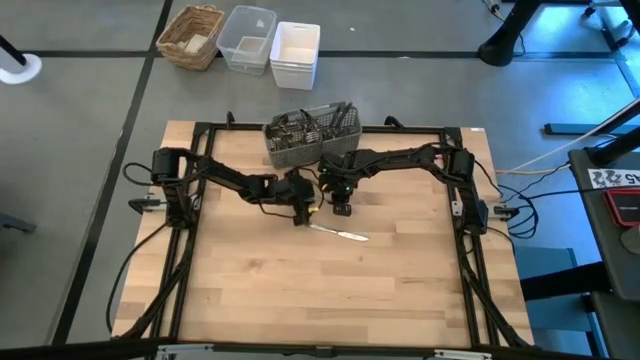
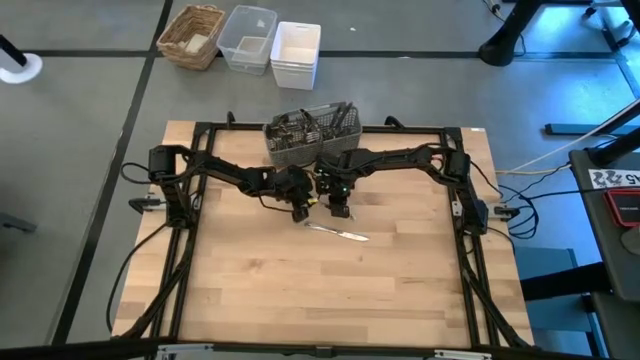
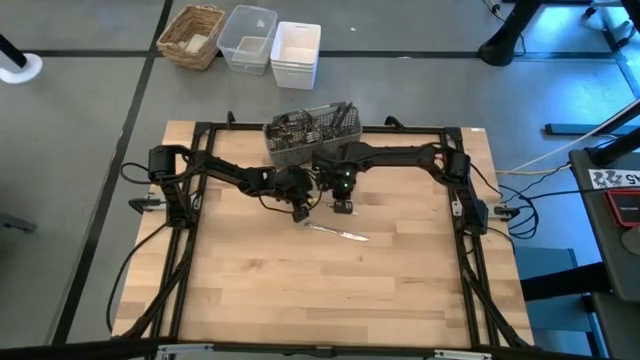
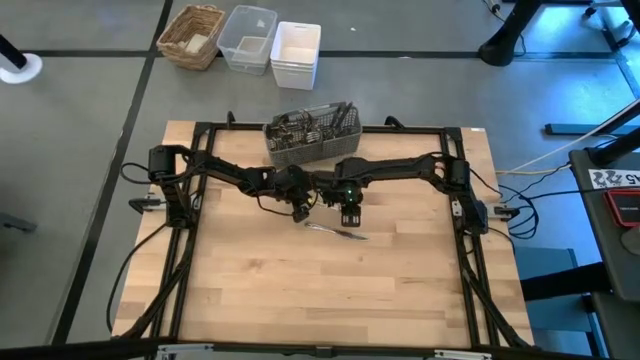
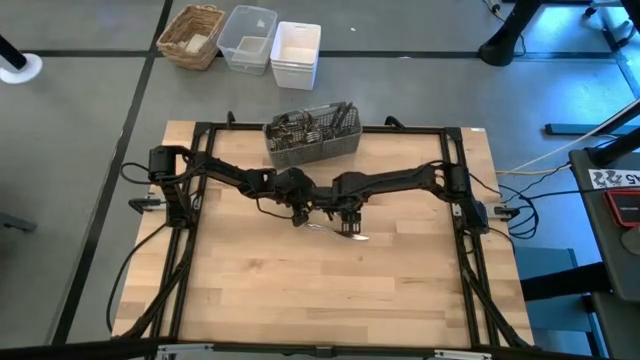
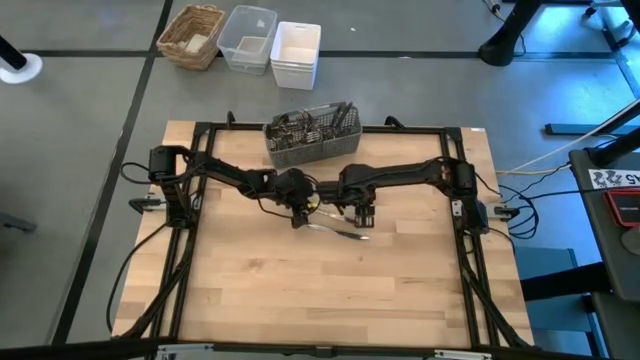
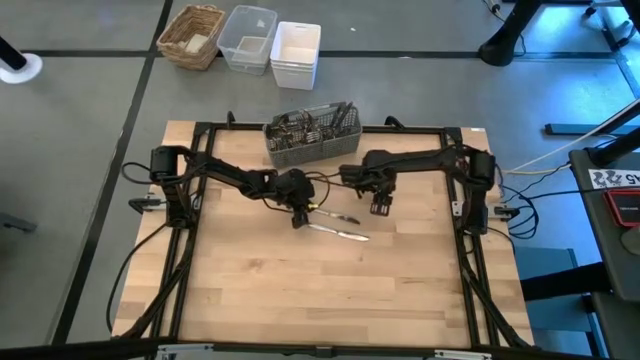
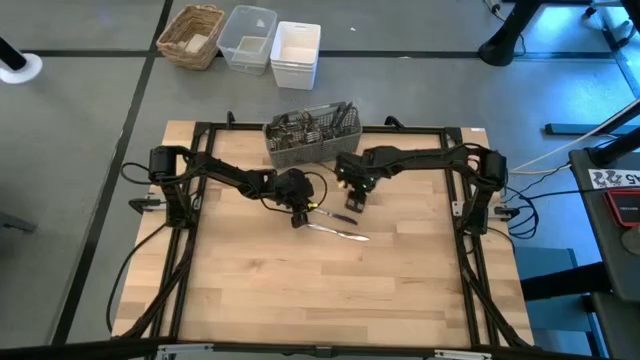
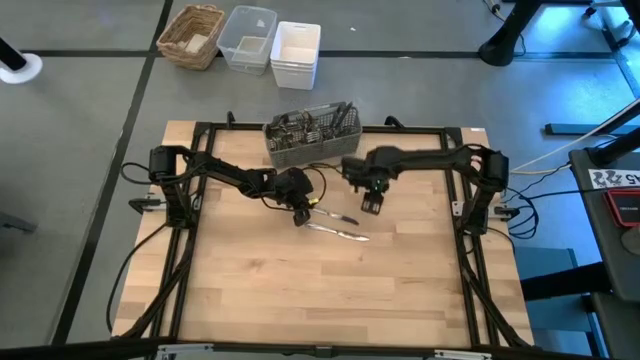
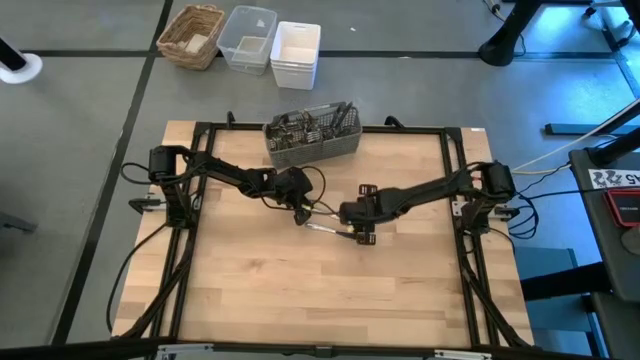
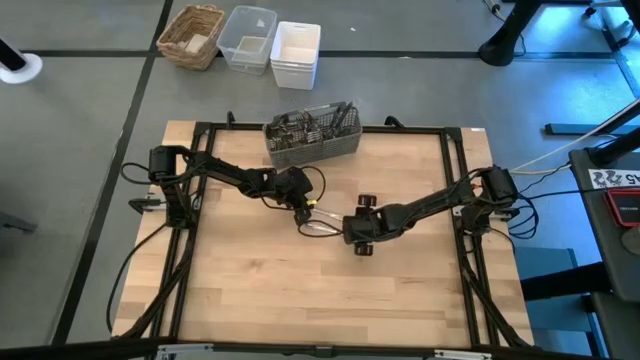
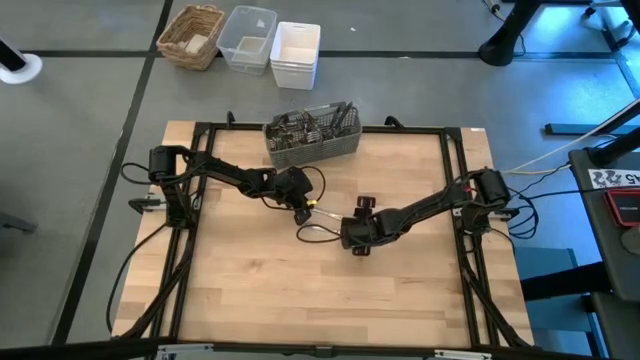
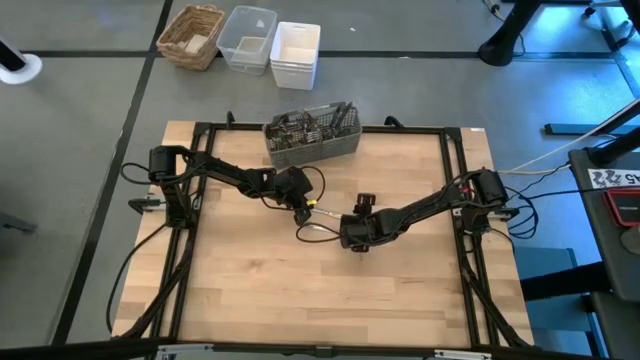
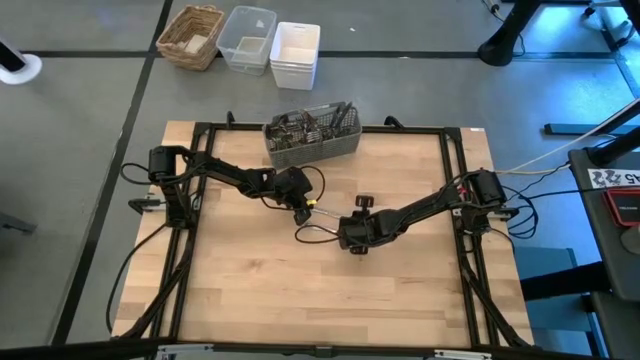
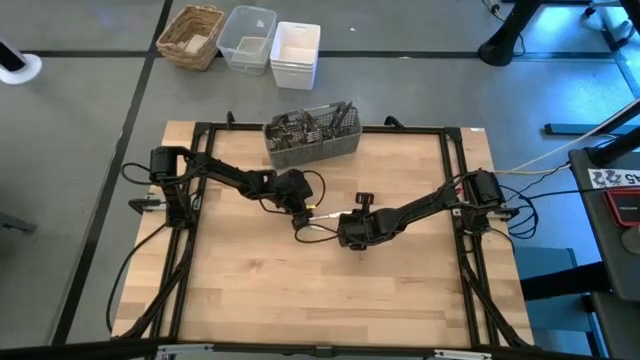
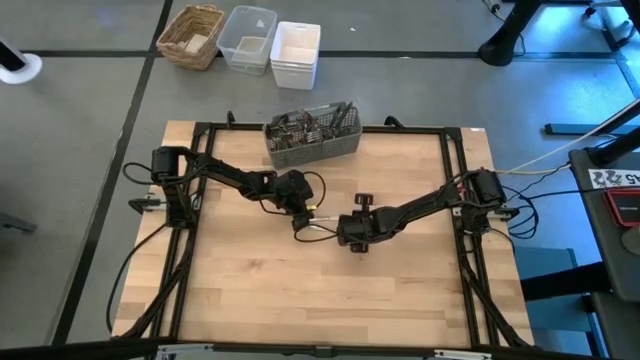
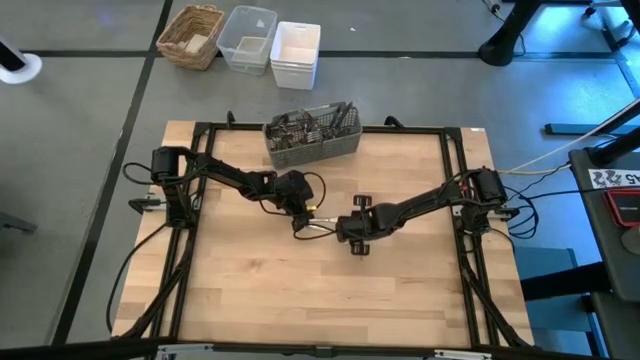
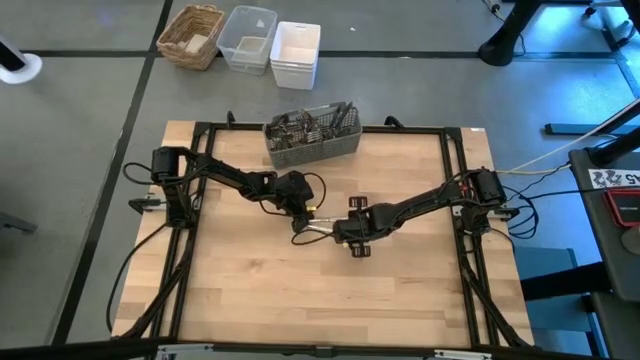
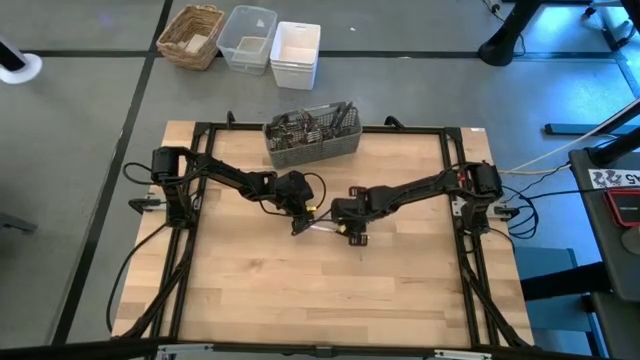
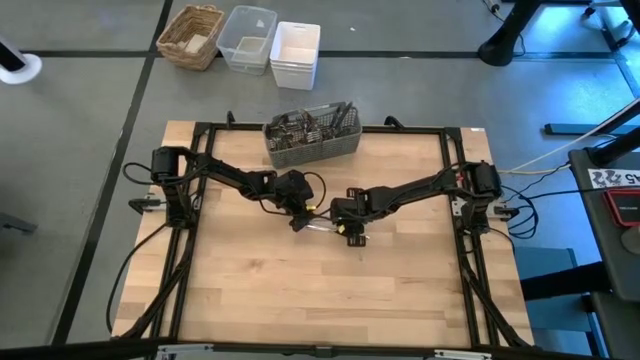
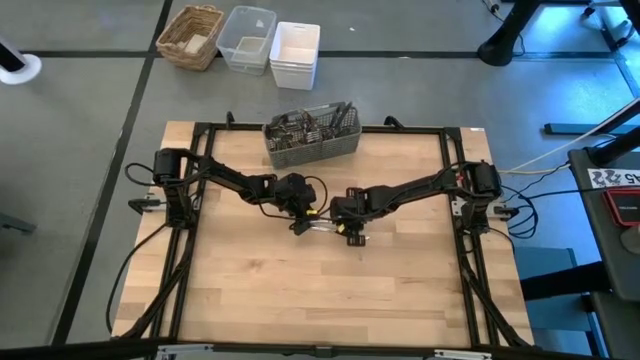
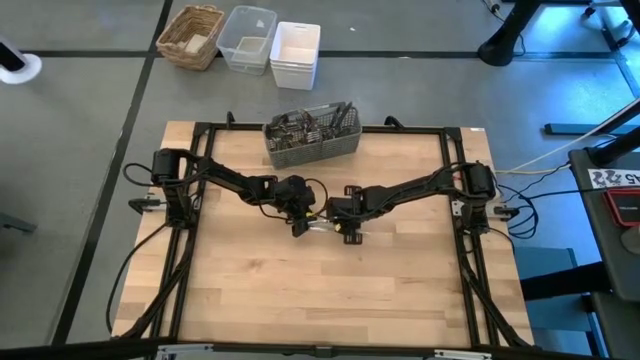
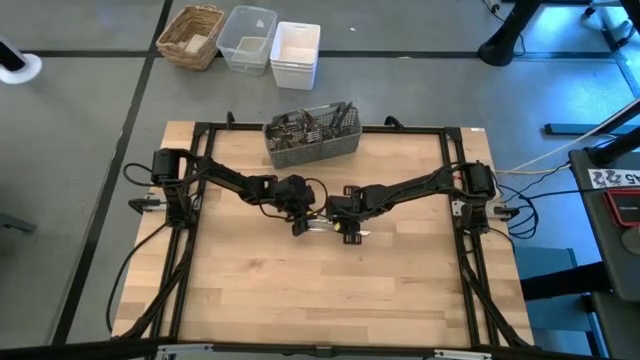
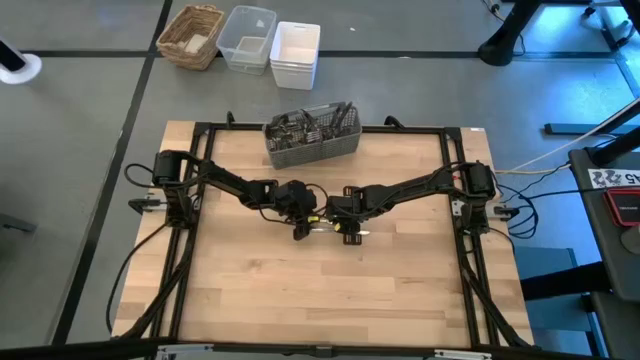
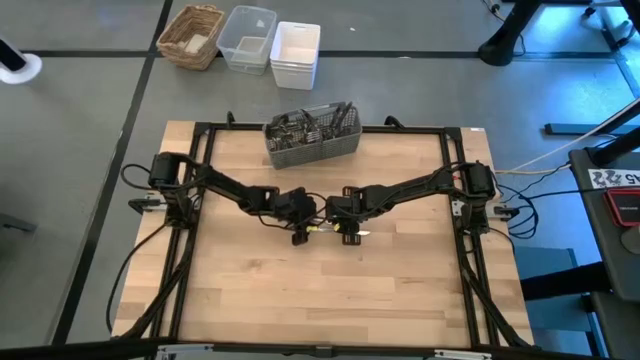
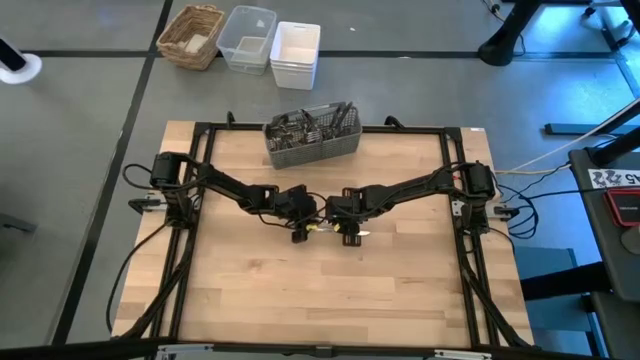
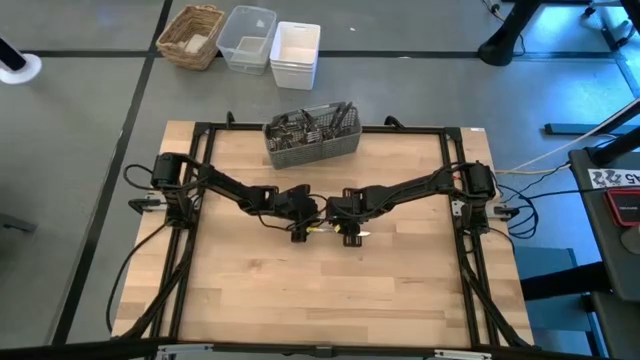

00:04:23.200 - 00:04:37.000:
Task: Sort silverware
Put the silver knife into the silverware rack

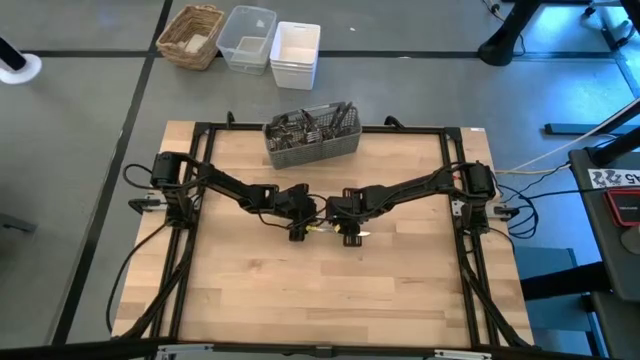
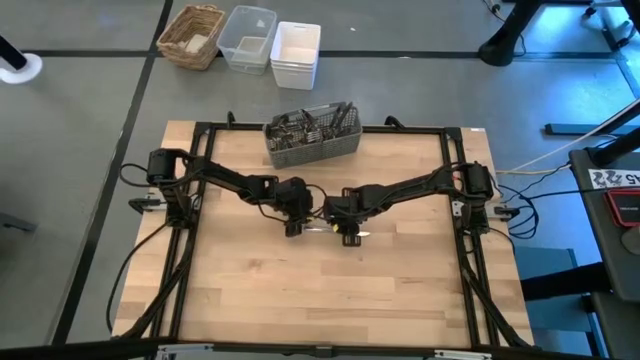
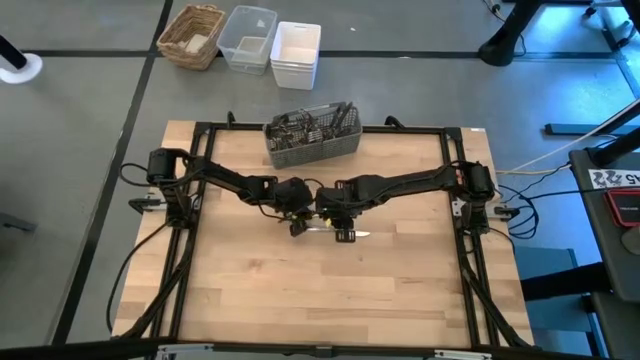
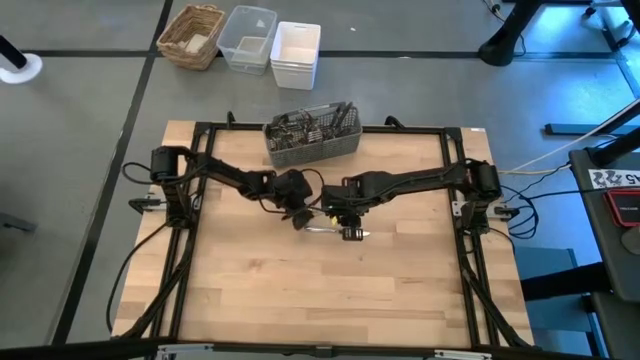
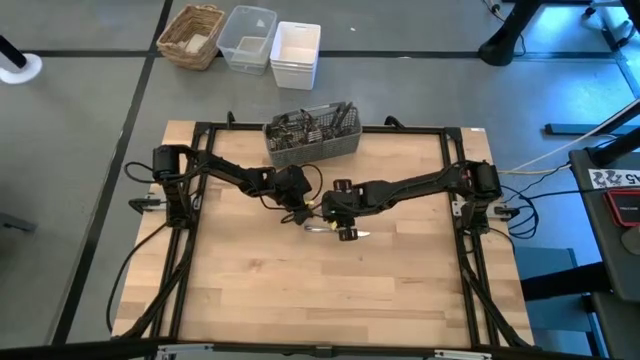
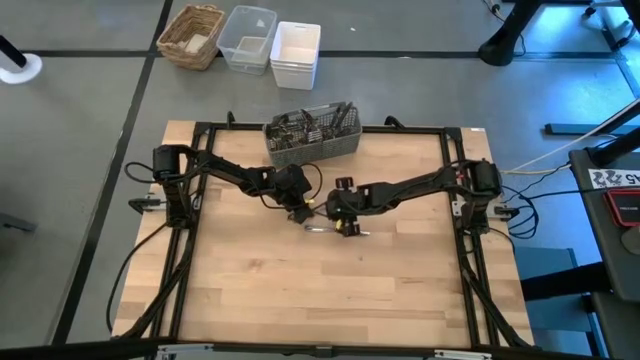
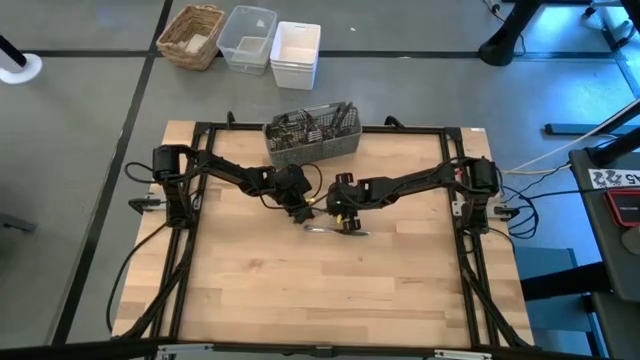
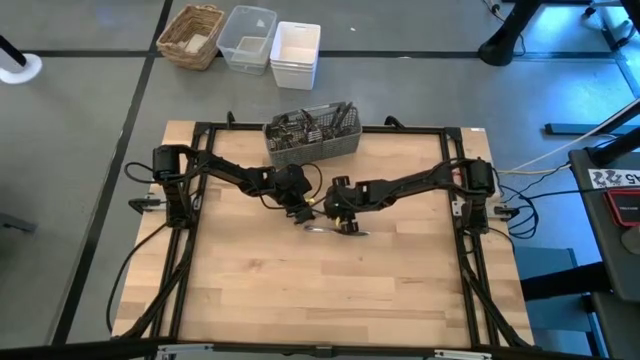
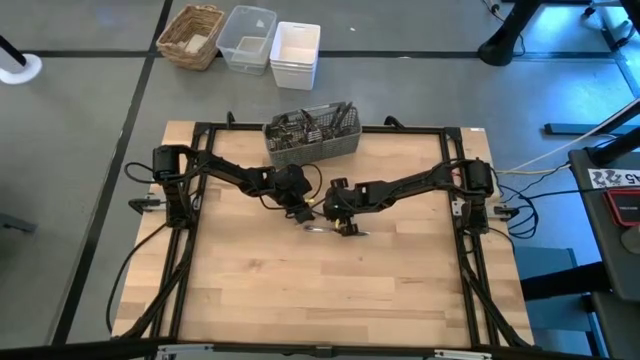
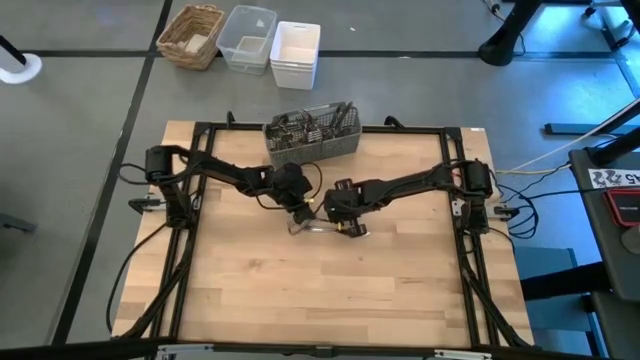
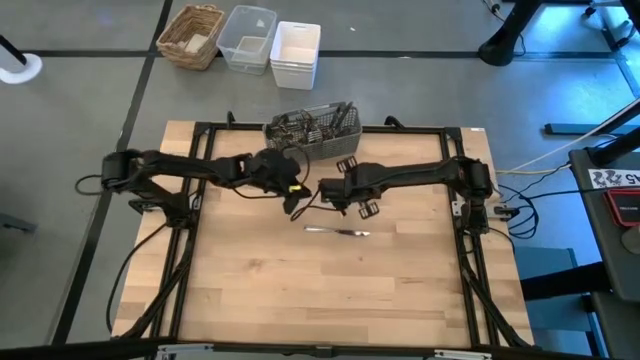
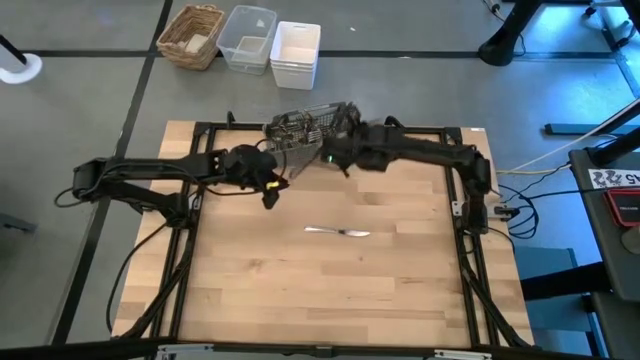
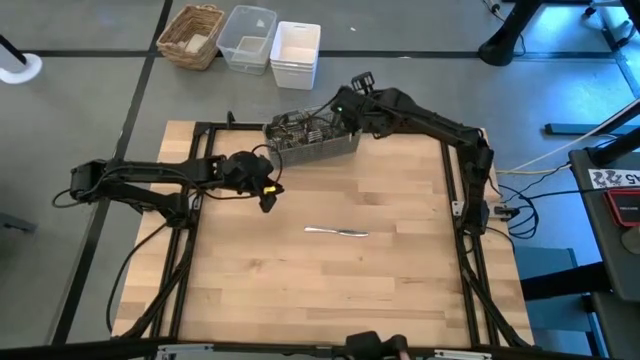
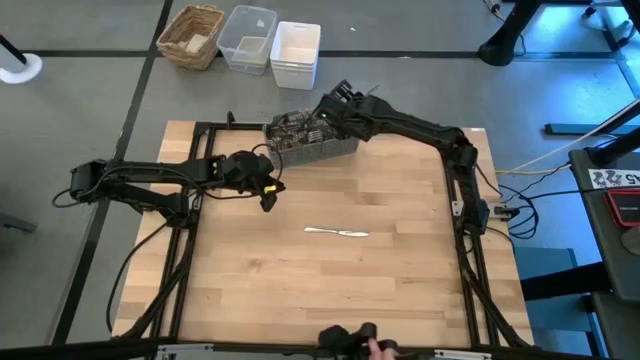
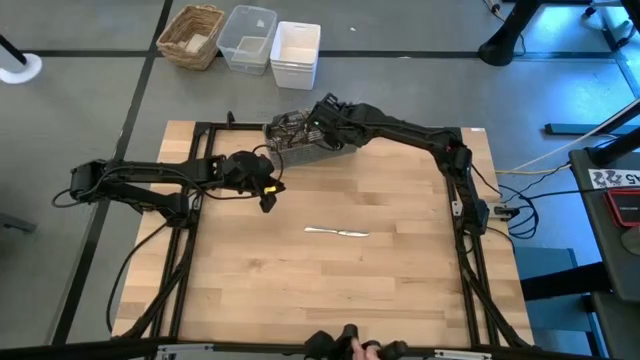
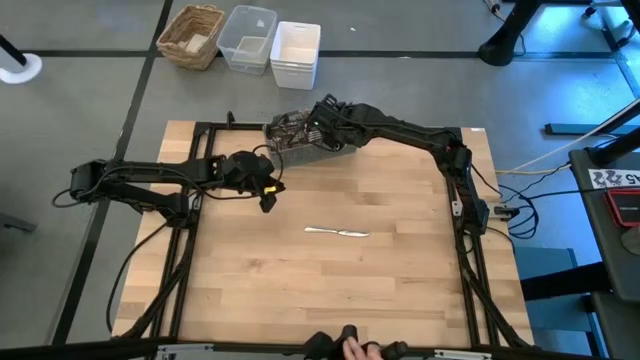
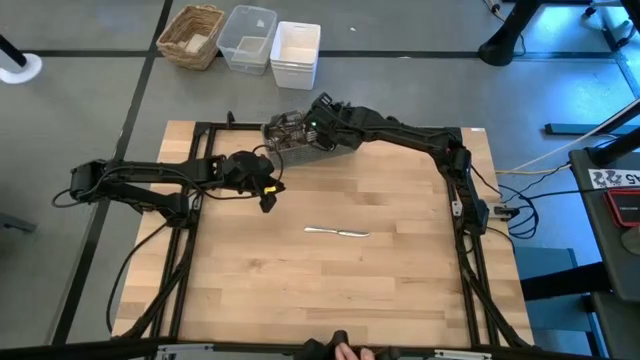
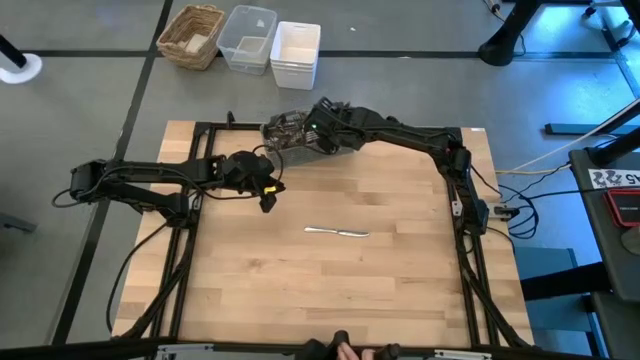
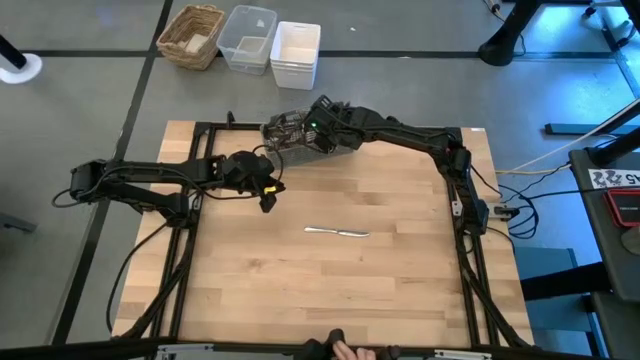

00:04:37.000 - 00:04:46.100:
Put the silver knife into the silverware rack
